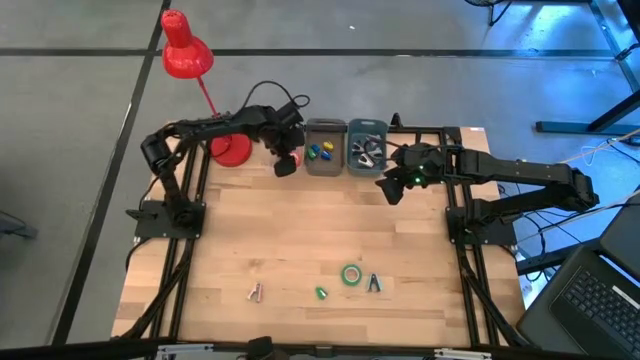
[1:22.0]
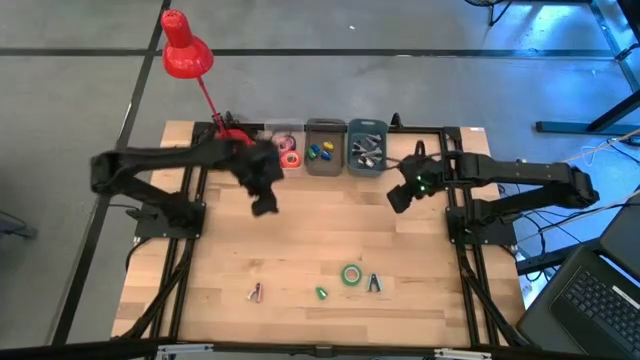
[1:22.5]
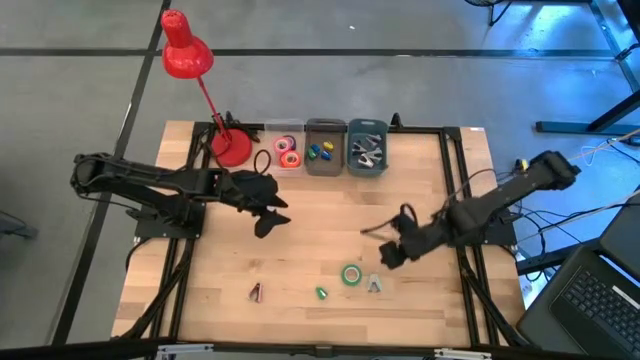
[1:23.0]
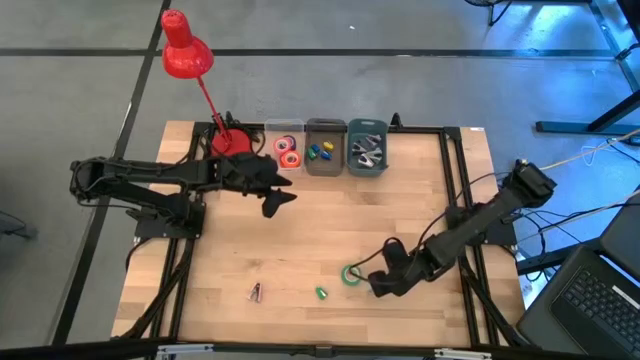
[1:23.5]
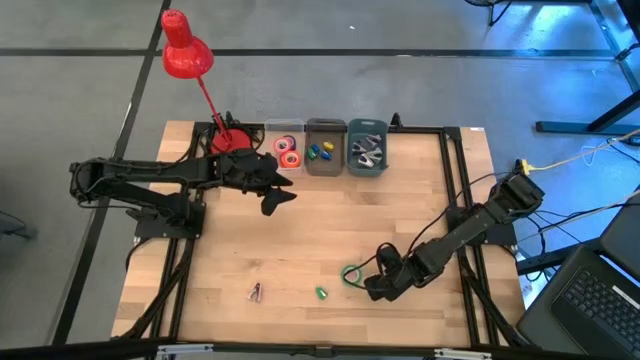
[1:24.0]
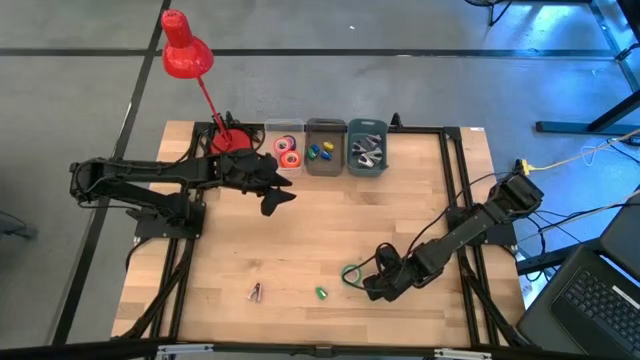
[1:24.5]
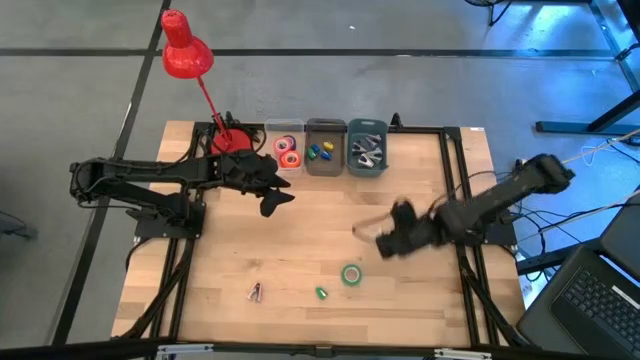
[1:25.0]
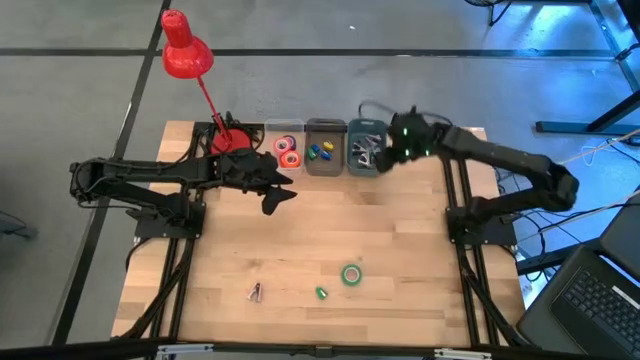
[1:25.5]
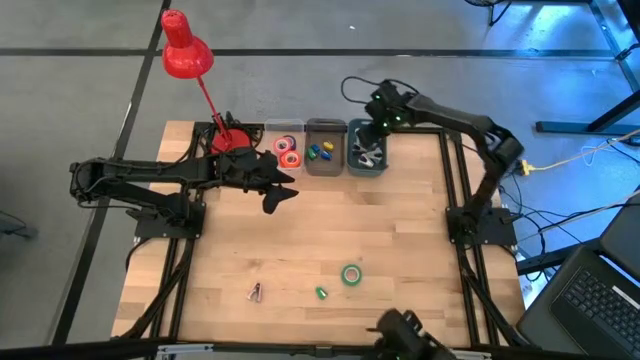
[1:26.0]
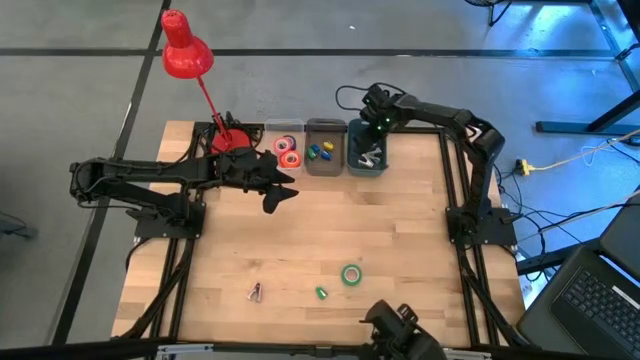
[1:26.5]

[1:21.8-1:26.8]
Task: Pick and place Stapler, Stapler remover, tape
Put the light blue staple remover into the blue bin

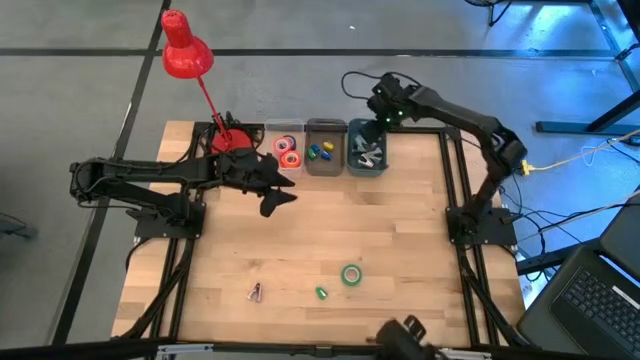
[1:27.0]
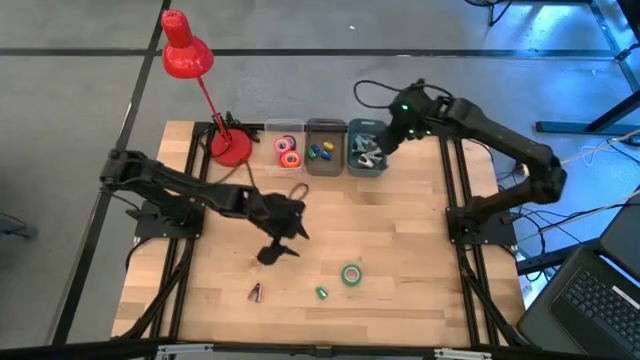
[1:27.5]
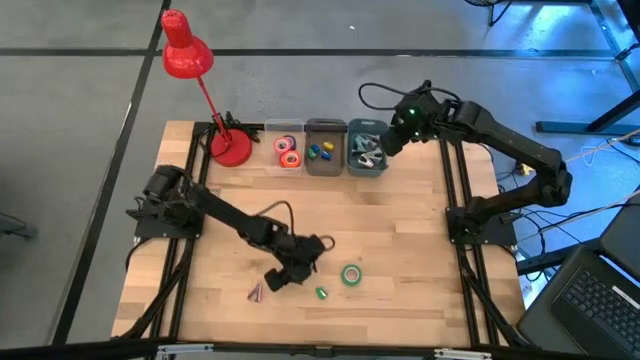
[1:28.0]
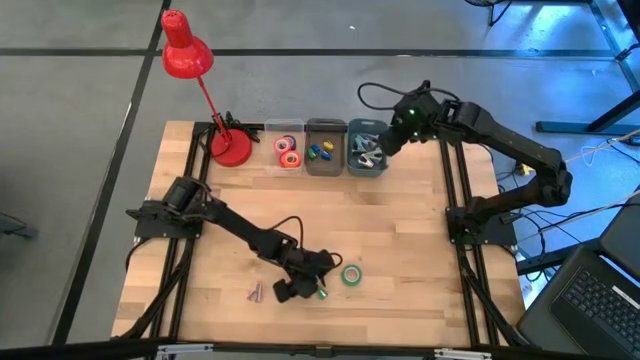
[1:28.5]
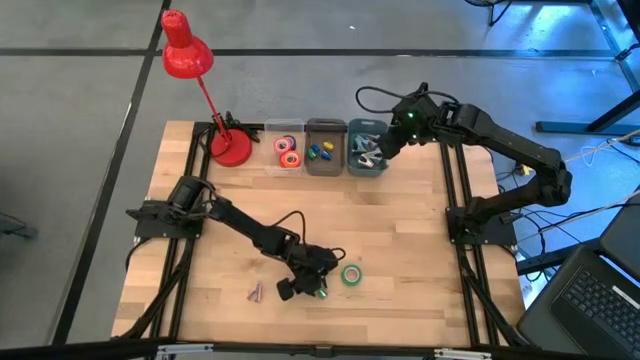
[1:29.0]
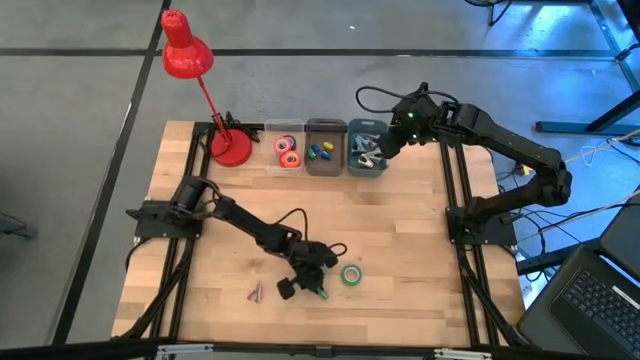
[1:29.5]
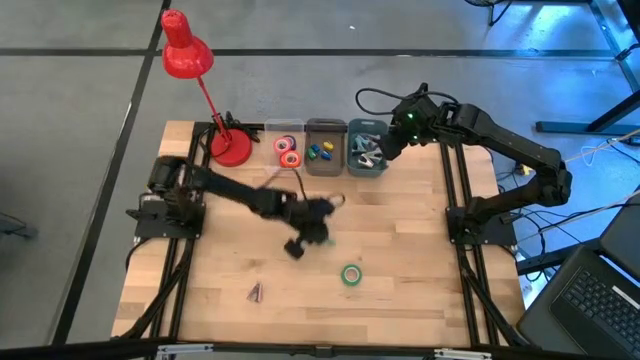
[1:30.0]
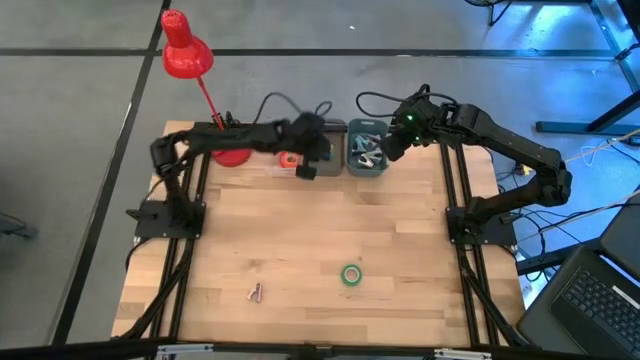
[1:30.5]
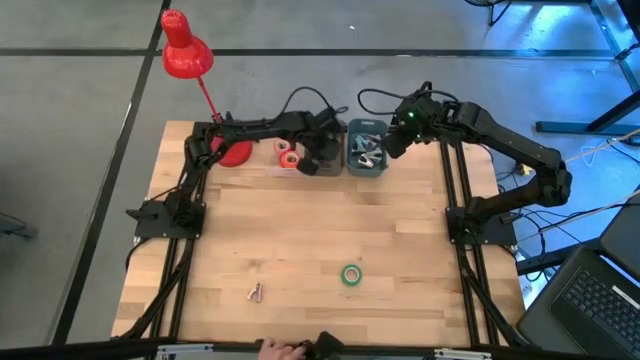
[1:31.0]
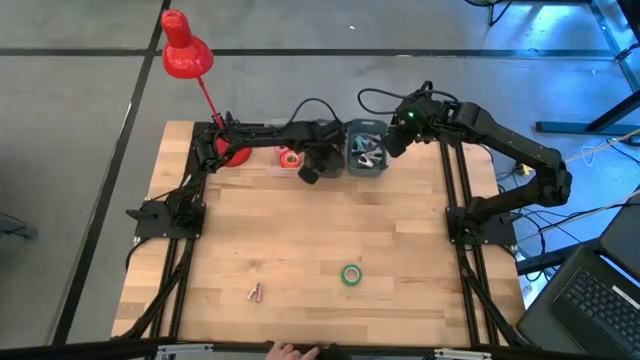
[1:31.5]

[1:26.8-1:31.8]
Put the green stapler into the black bin

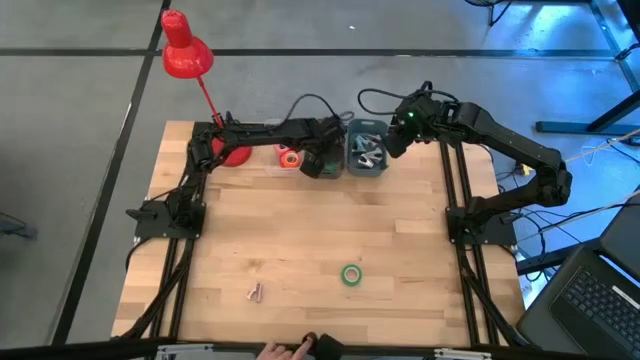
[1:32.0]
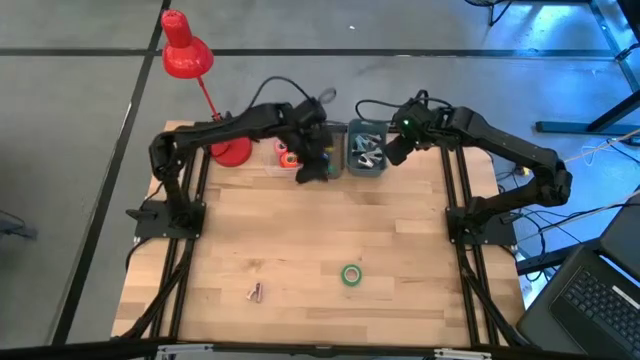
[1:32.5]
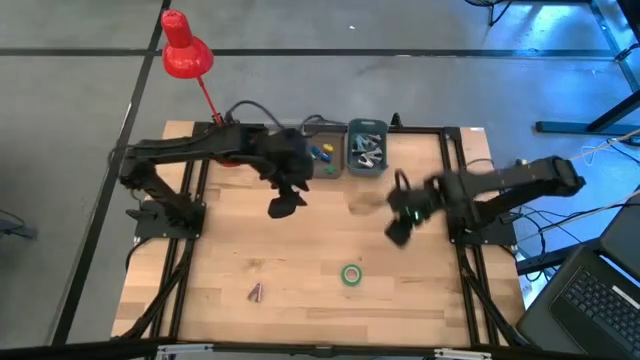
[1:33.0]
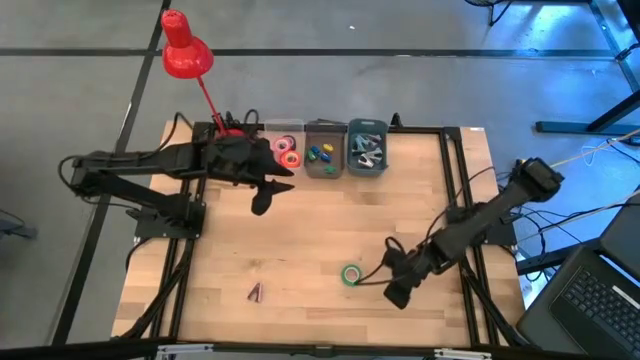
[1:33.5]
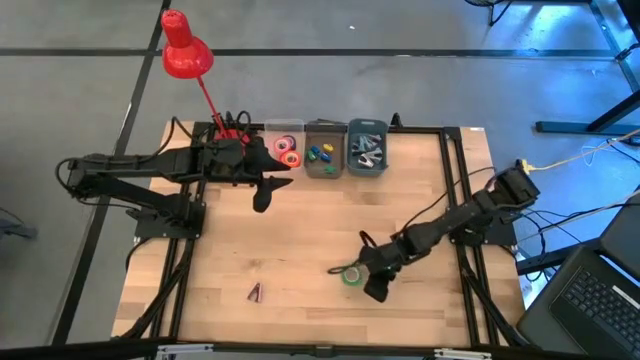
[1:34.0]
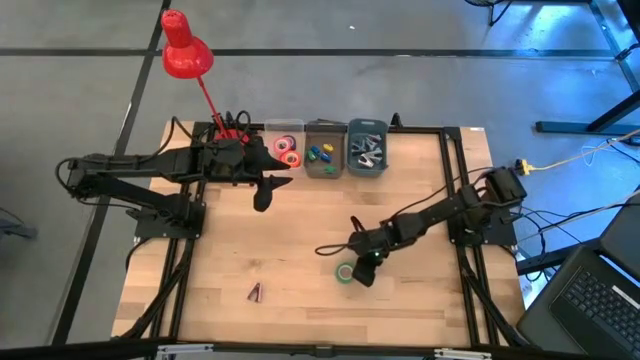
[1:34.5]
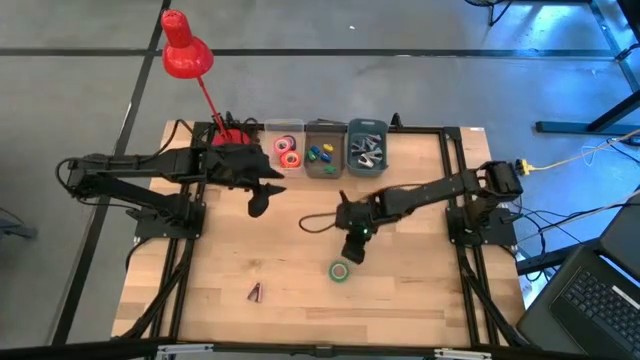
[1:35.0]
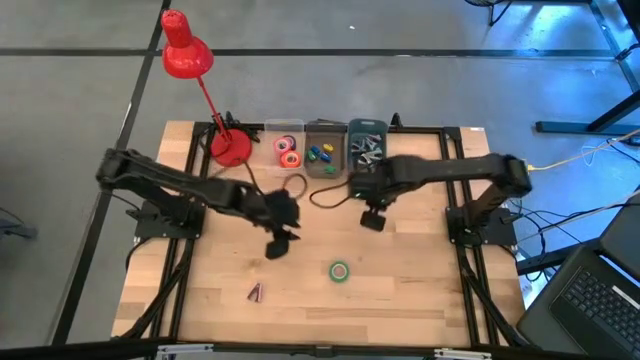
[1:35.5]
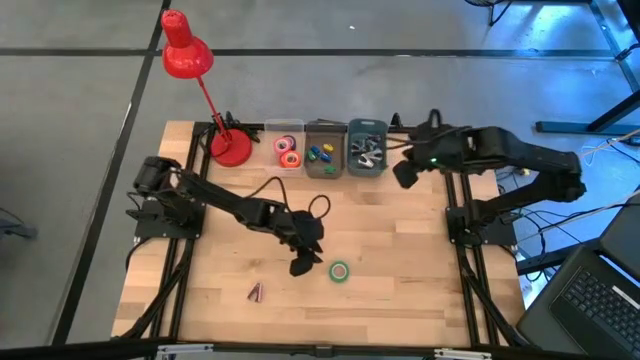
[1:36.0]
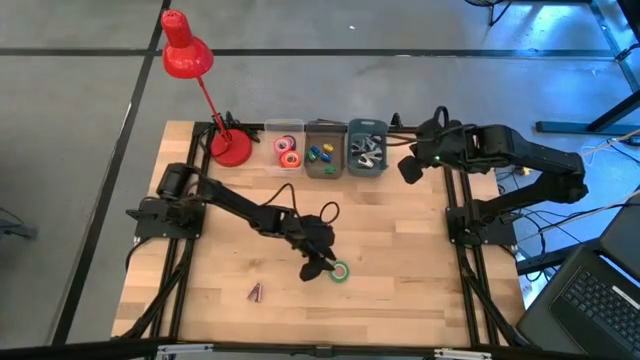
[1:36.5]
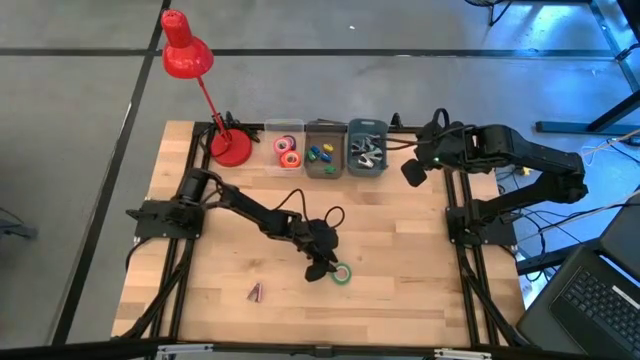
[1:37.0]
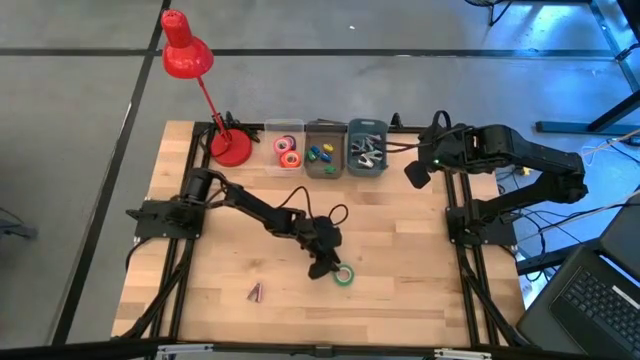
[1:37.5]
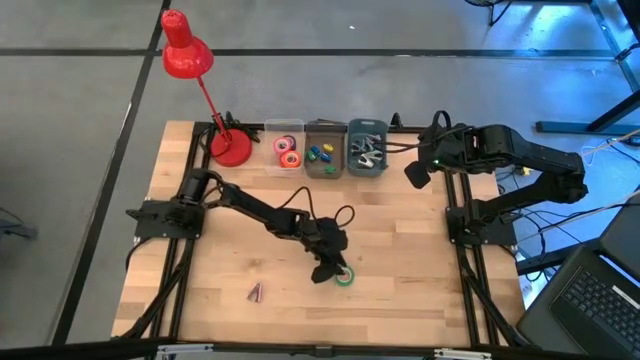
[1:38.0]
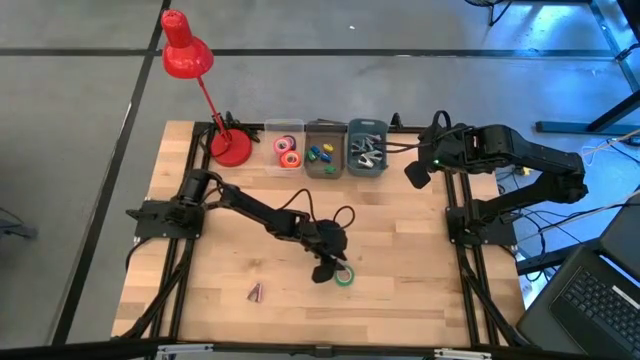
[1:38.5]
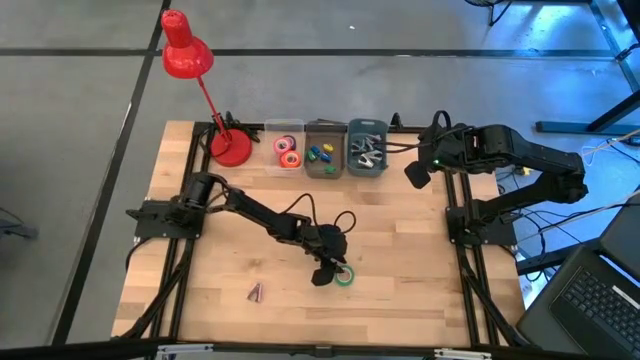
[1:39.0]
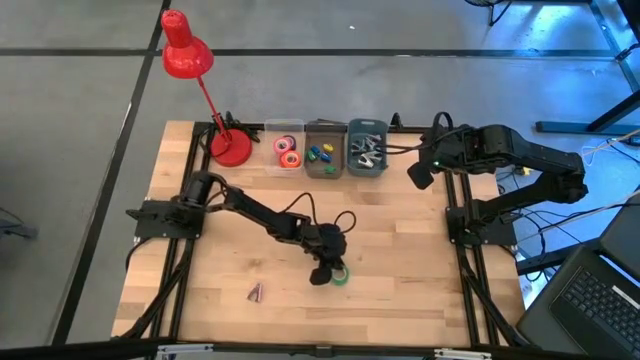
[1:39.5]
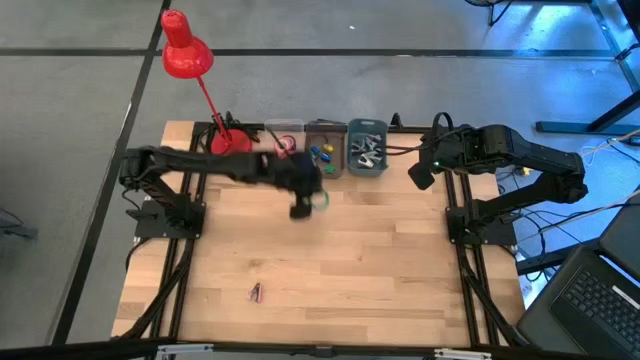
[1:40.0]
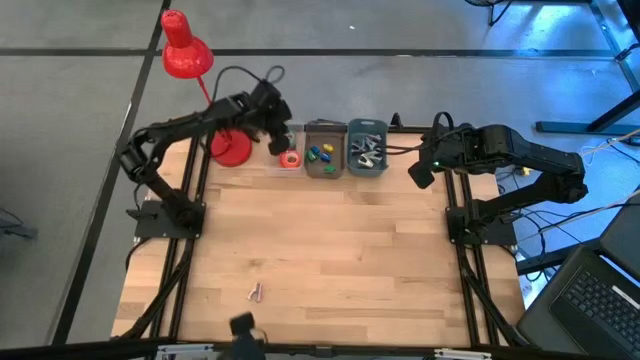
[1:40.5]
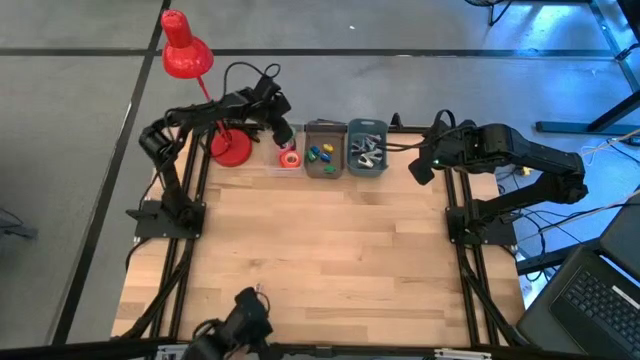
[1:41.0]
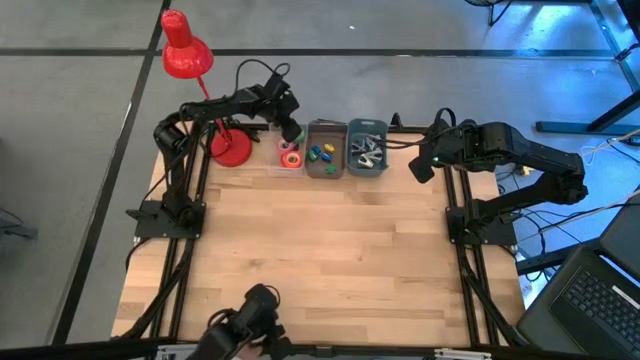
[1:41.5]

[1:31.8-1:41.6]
Put the green tape into the transparent bin

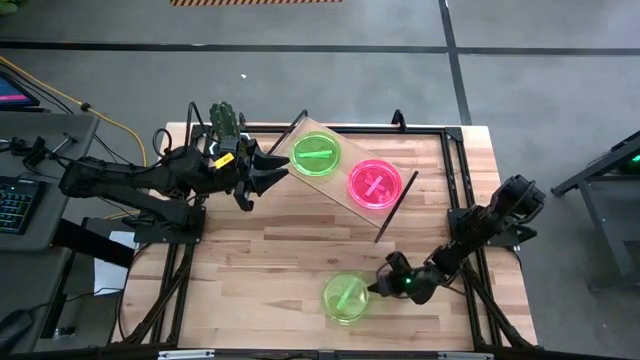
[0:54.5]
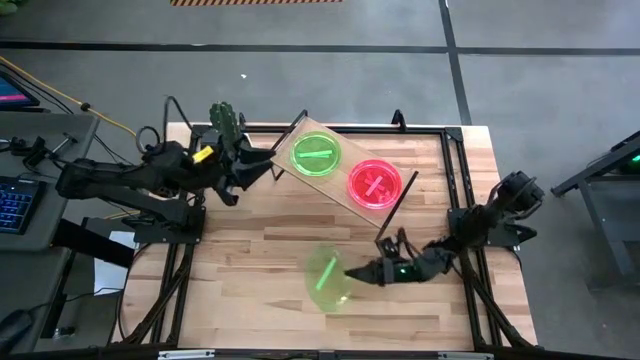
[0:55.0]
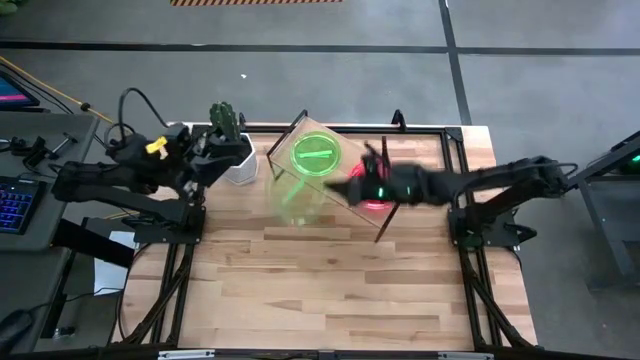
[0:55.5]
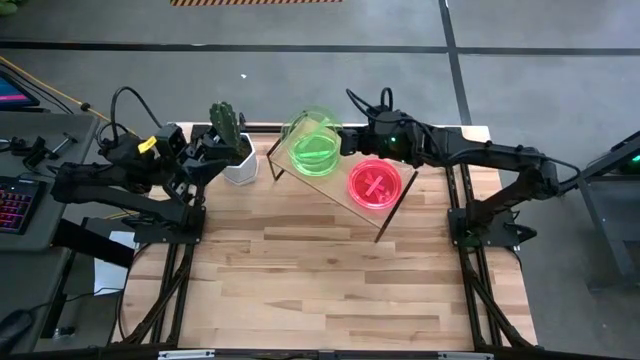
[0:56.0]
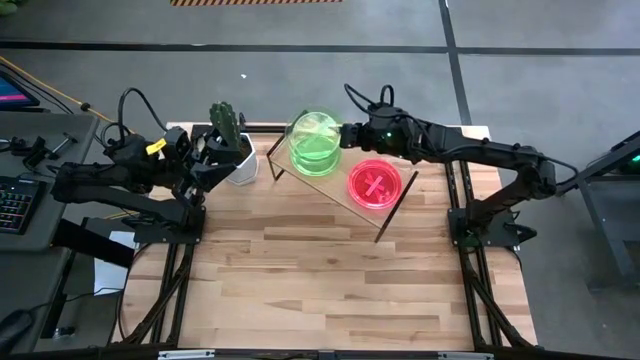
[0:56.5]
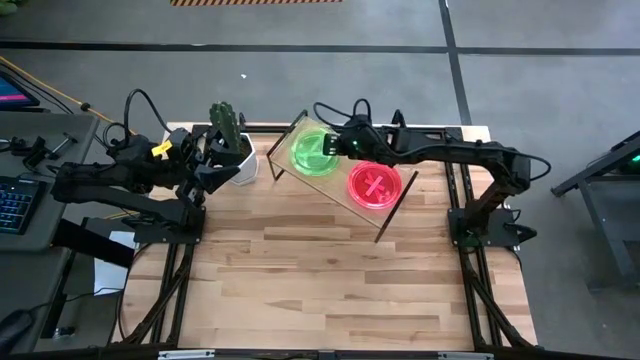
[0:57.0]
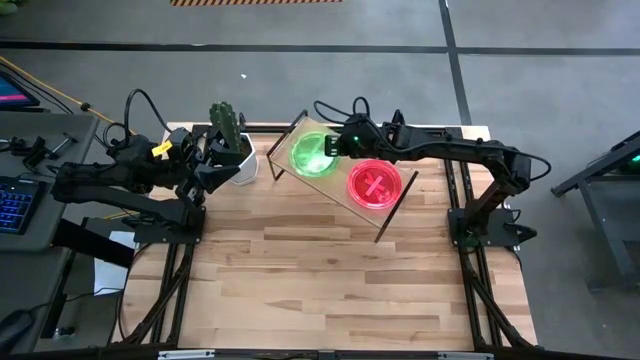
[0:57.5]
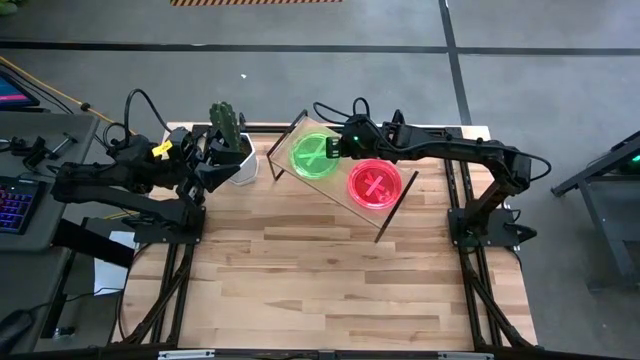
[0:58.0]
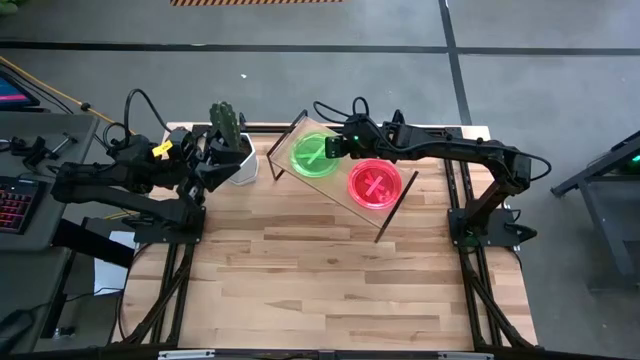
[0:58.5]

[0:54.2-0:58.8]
Task: Place and stack plates onto a shelf
Stack the light green plate on the other light green plate on the shelf
